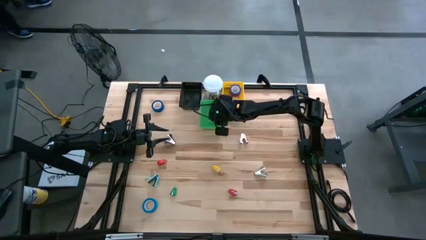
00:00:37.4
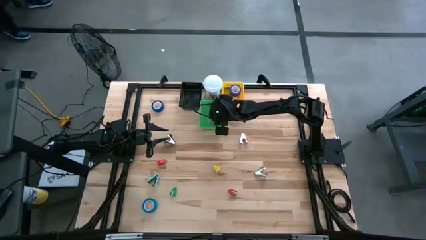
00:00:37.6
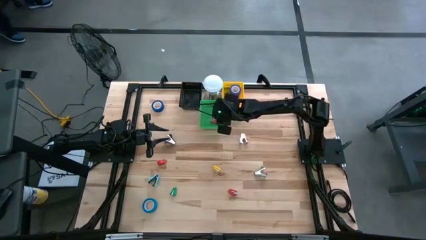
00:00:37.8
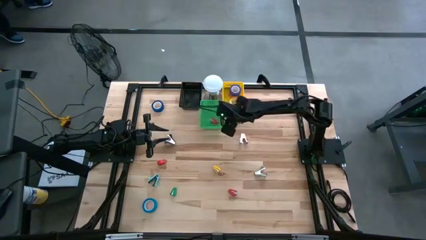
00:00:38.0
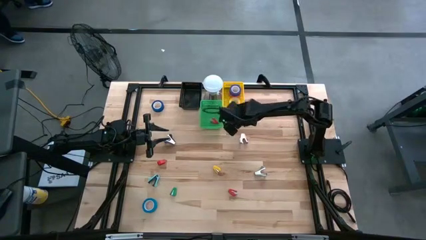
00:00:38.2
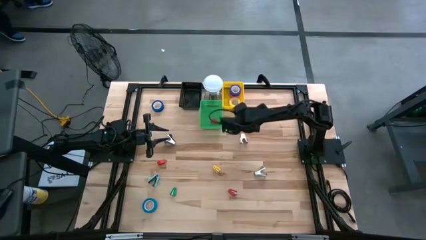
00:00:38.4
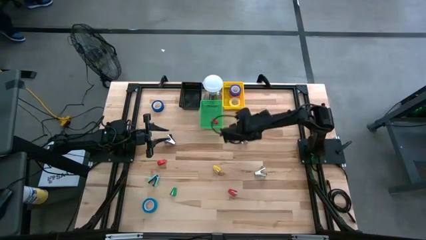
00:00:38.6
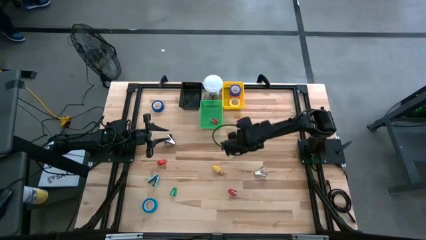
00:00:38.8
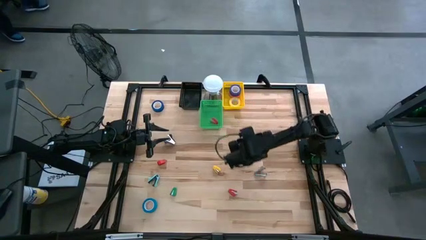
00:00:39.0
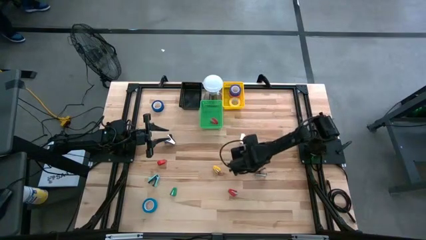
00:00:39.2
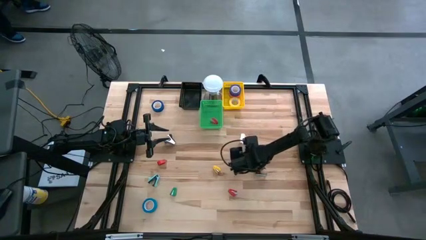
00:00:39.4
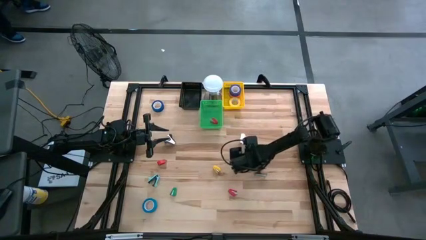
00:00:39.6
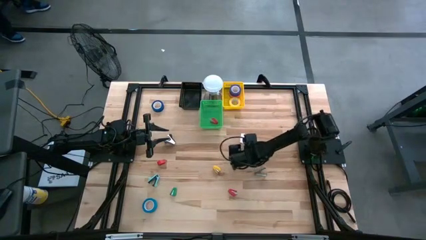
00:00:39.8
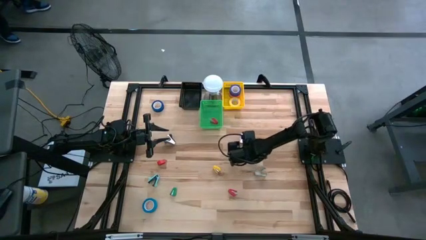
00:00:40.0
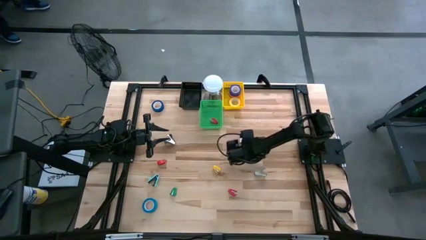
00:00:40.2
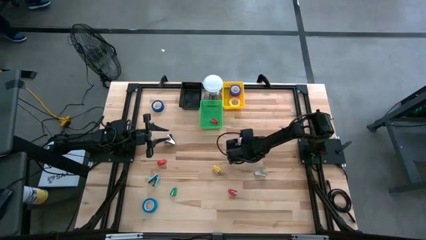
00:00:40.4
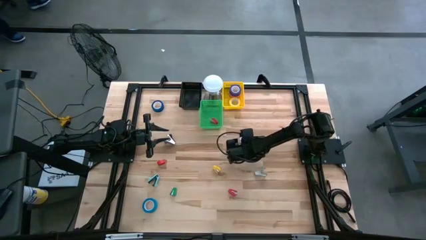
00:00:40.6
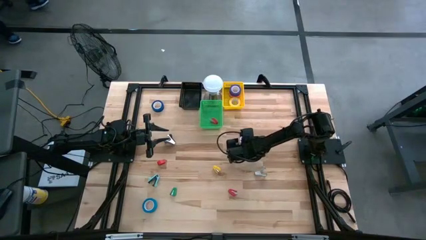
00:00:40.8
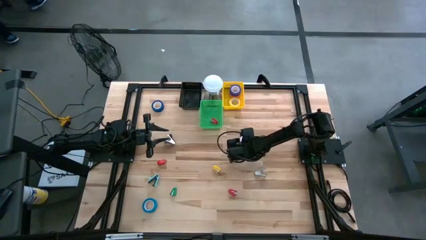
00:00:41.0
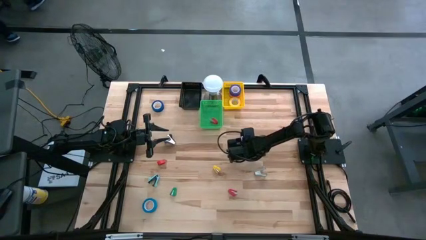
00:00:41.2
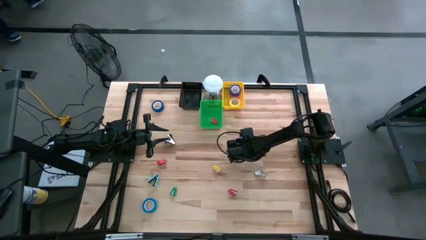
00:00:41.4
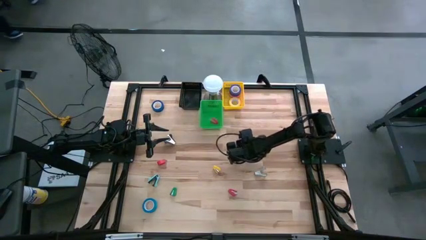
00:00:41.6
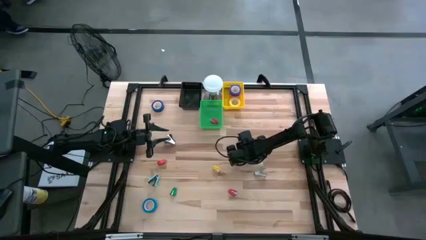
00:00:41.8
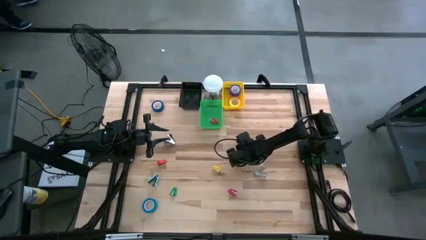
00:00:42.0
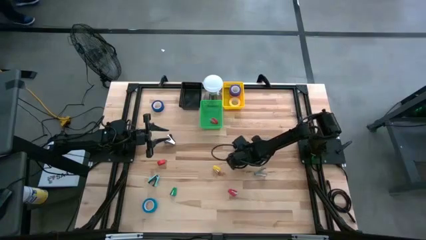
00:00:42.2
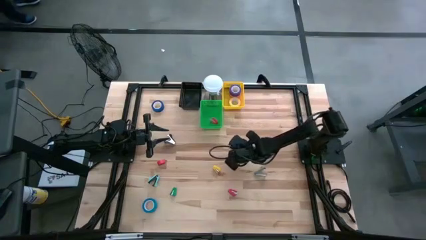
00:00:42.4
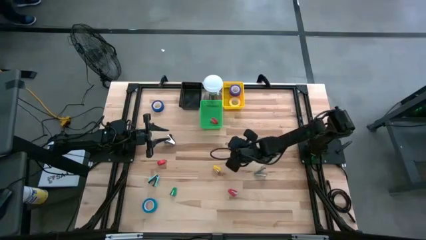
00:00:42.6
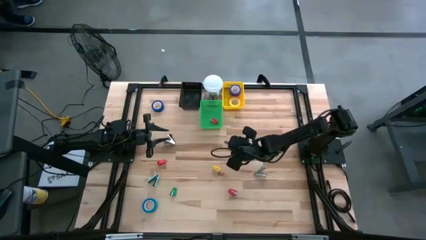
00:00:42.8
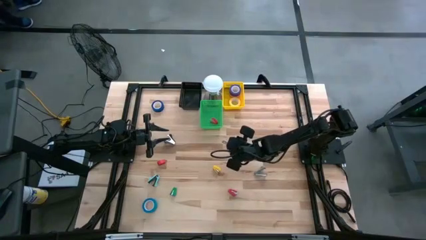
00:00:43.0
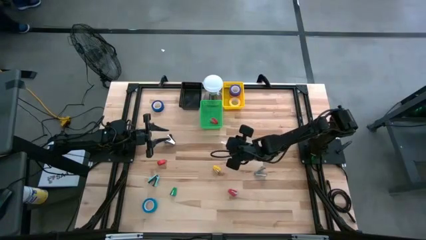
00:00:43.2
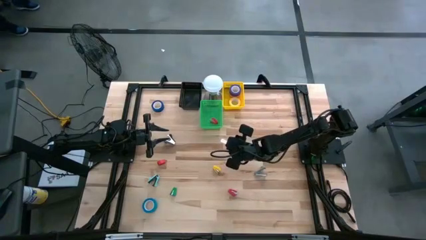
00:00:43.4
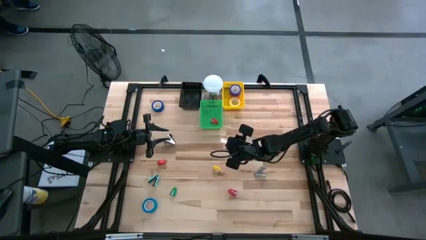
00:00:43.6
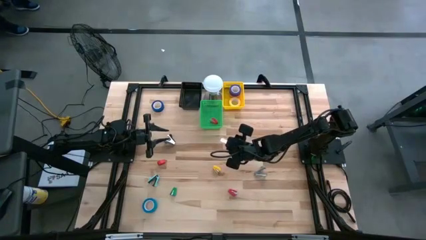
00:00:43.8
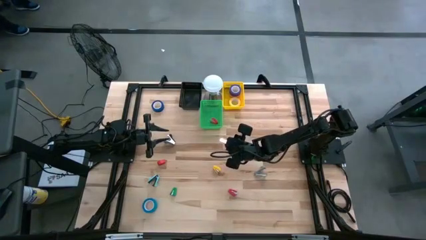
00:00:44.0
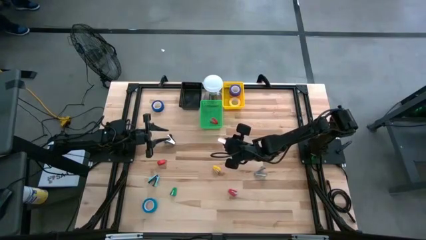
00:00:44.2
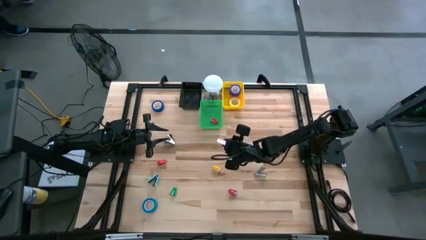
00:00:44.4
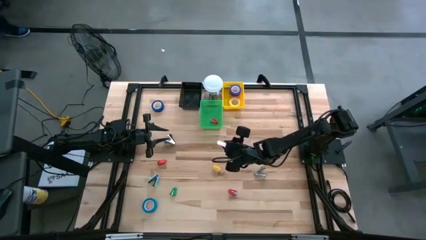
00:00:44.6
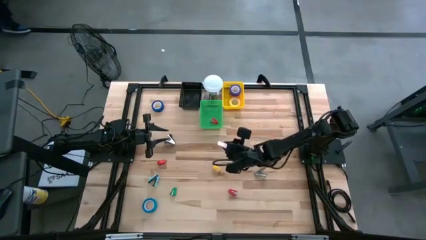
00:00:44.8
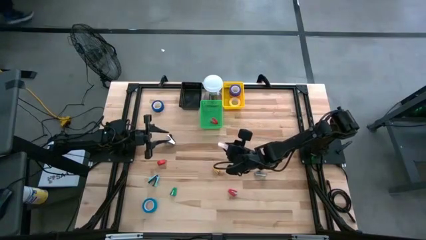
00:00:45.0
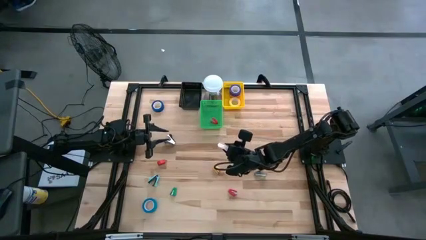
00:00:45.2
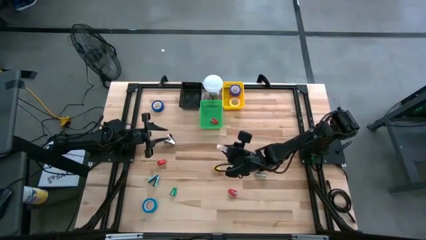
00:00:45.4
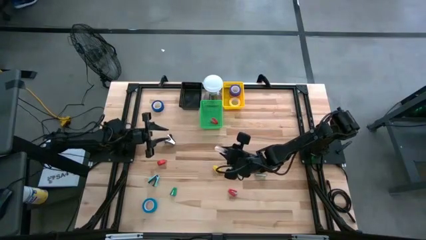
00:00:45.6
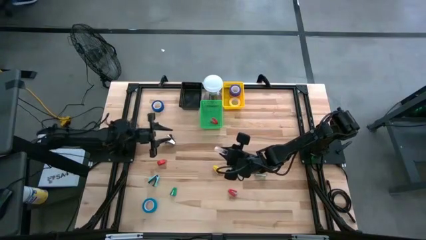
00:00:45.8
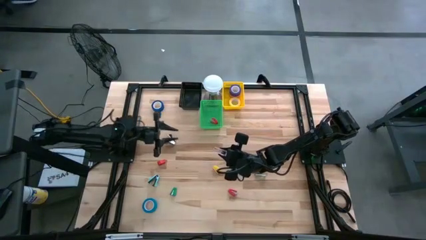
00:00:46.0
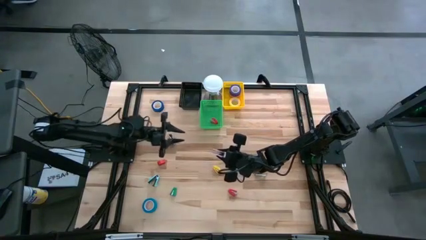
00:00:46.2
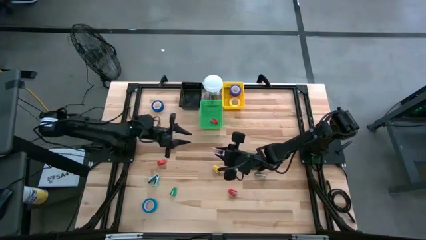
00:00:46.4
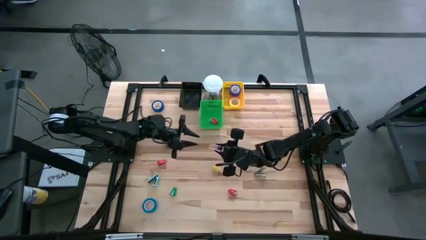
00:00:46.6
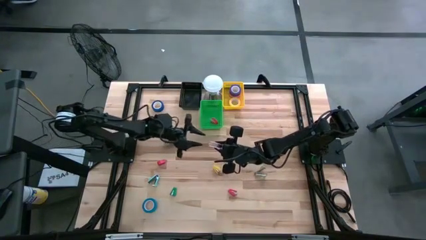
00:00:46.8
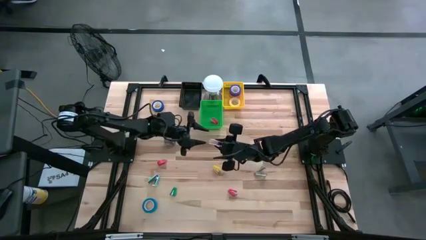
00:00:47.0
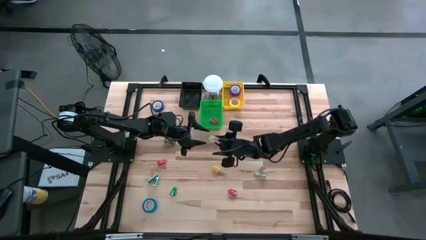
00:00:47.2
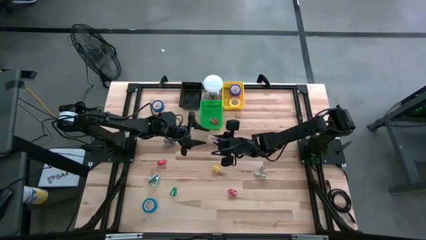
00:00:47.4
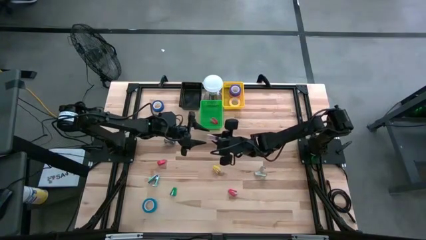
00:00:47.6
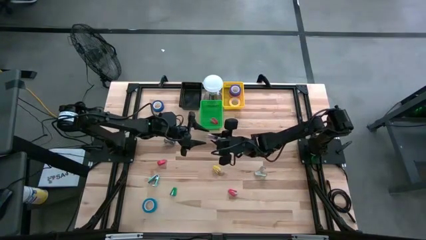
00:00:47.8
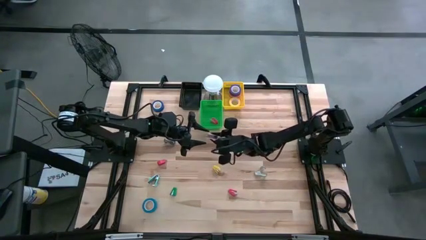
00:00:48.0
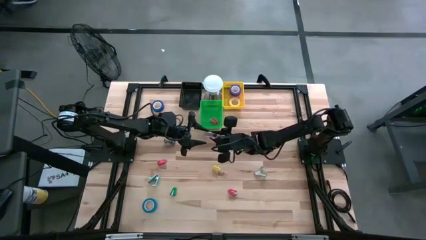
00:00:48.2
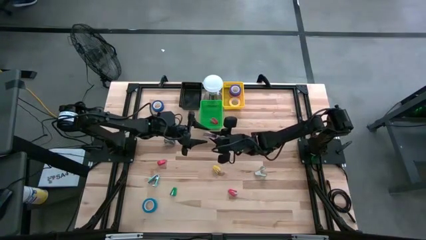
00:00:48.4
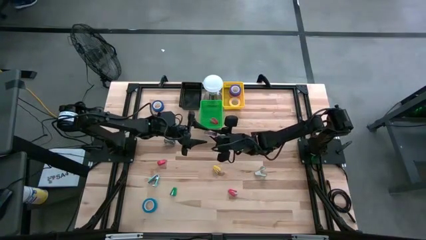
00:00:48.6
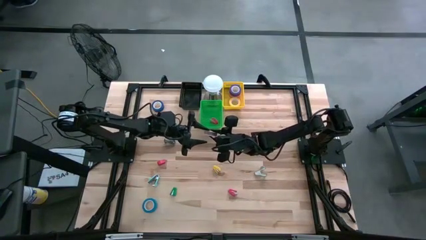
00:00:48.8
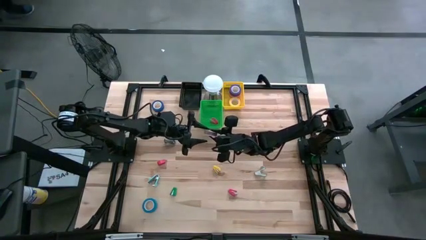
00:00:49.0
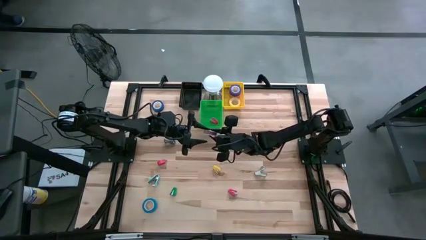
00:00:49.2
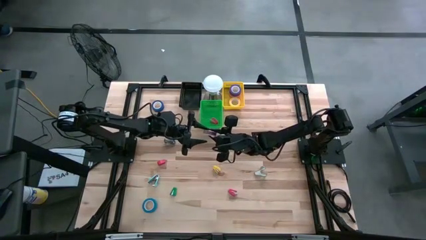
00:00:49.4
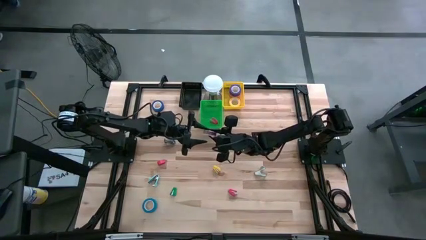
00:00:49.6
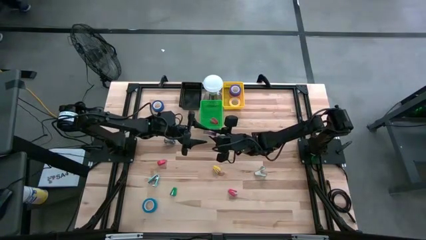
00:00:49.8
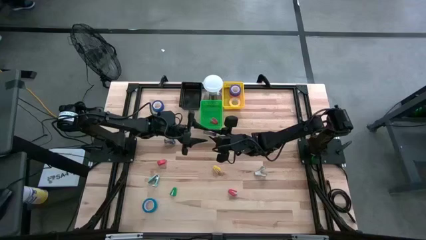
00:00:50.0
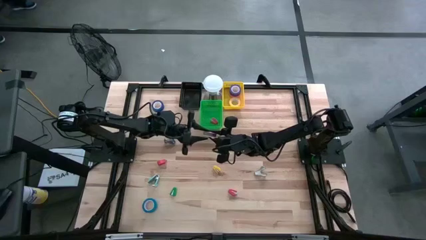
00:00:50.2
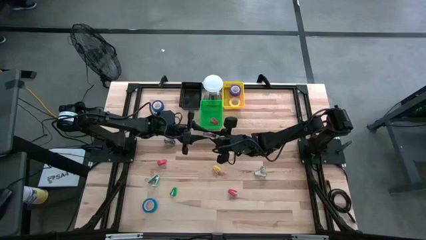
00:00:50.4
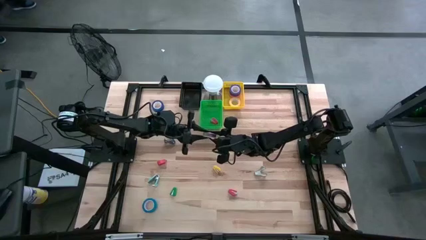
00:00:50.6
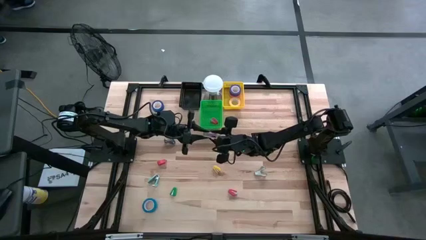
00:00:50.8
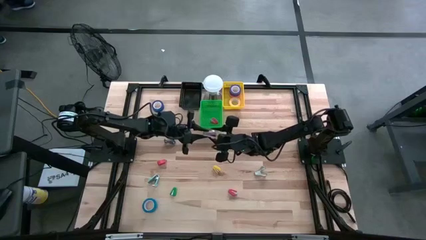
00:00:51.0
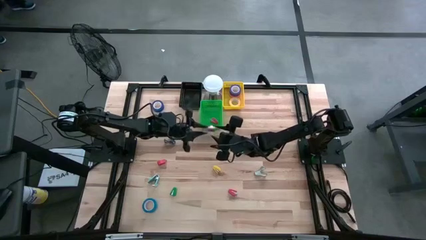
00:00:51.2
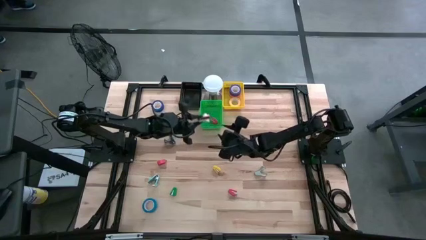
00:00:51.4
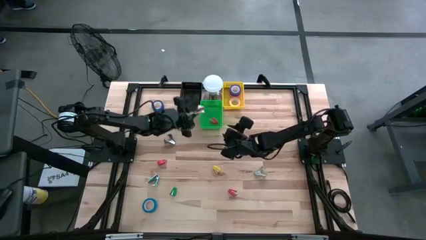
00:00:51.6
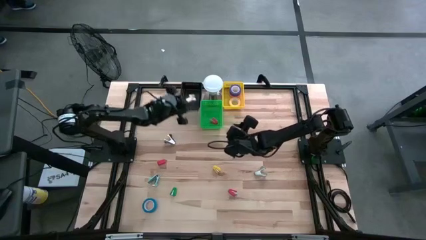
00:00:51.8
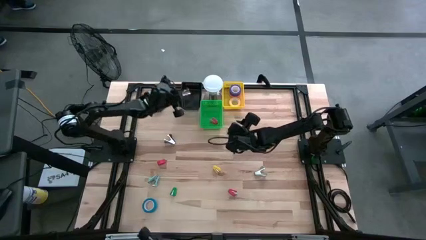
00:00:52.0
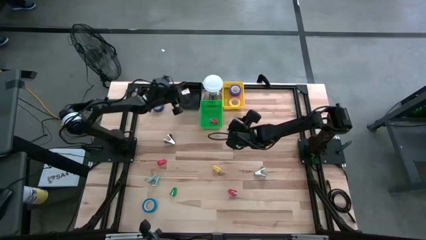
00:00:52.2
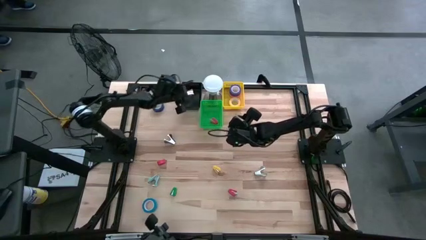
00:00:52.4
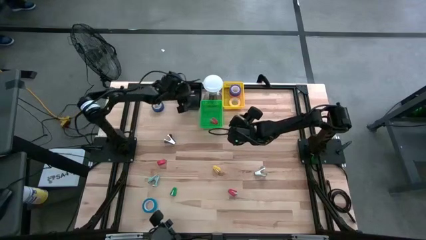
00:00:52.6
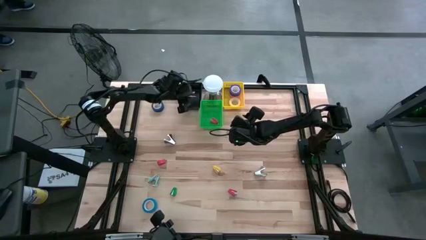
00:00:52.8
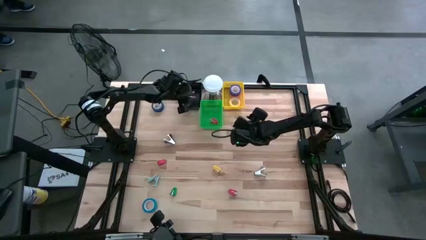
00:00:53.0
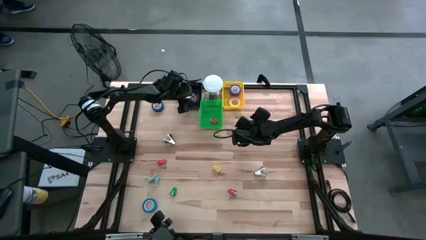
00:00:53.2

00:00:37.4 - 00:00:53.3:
Task: Pick and place Stapler, Stapler remover, tape
Put the pink staple remover into the black bin

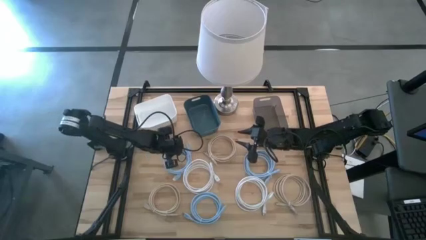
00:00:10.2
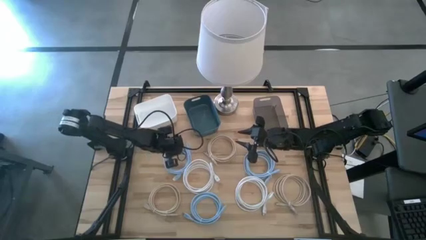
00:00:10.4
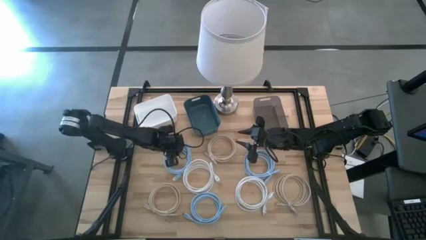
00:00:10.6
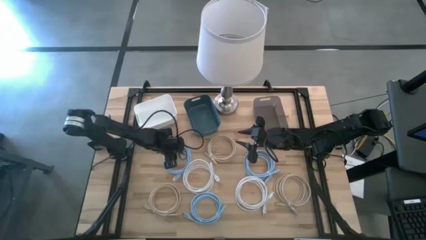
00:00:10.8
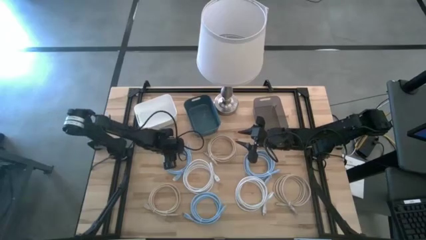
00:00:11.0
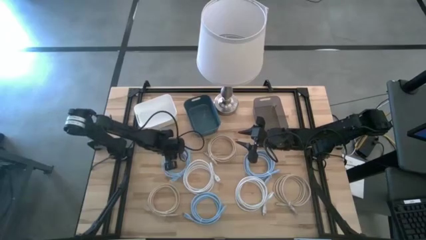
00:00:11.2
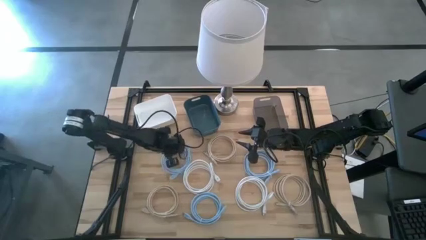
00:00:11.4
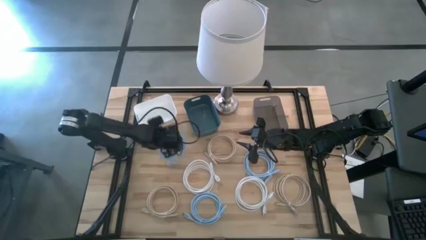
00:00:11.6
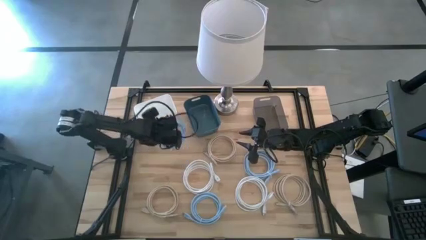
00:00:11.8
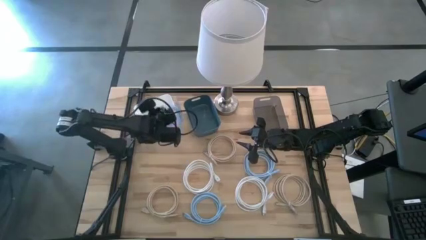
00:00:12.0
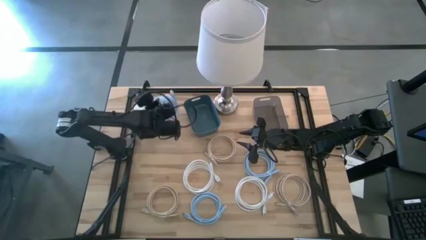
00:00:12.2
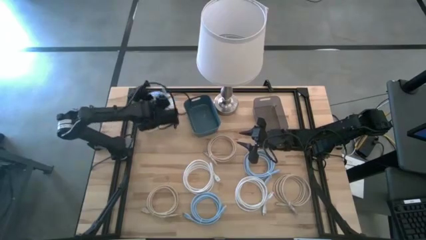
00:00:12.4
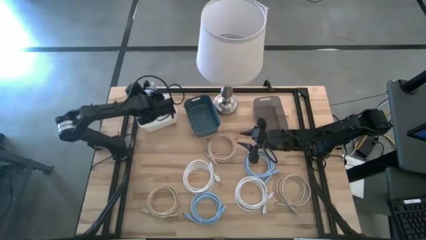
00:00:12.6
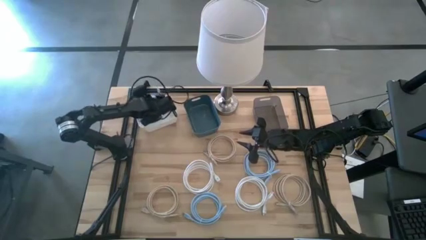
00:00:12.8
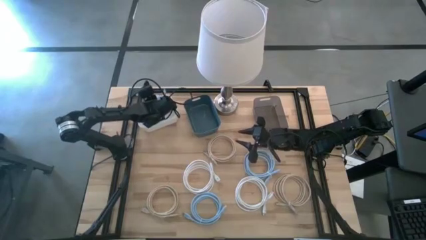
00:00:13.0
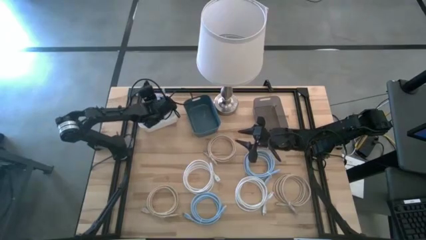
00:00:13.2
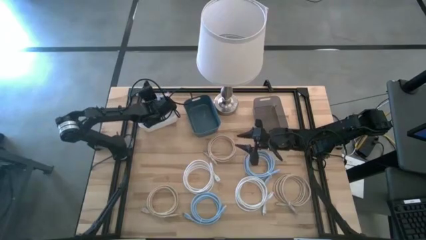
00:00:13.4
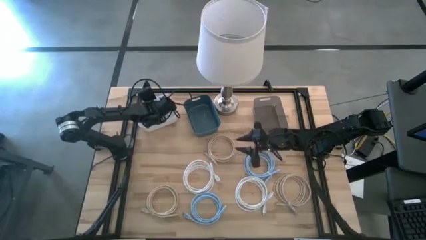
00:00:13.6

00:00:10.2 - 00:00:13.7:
Task: Pick & Place USB Port
Put the top left blue charger cable into the white bin
